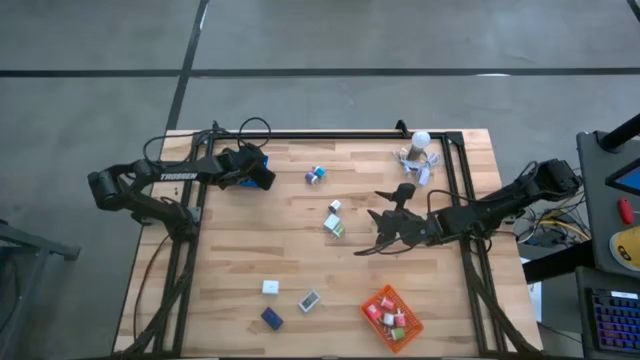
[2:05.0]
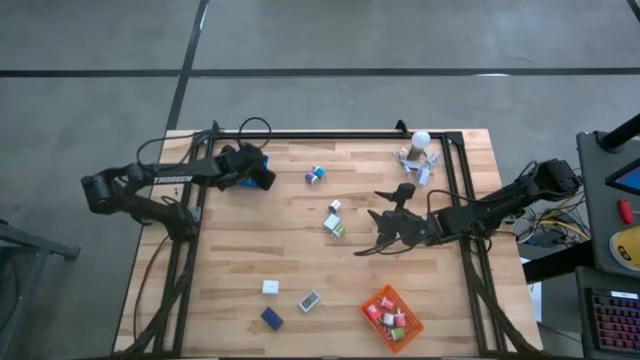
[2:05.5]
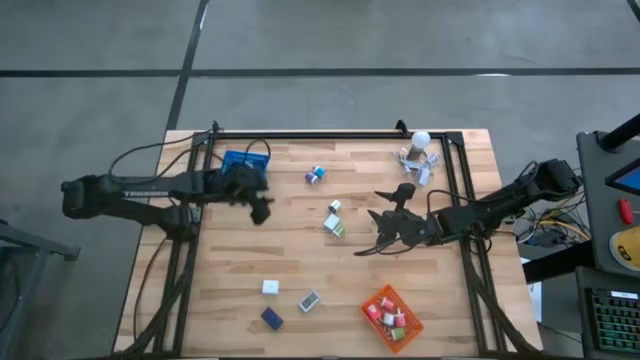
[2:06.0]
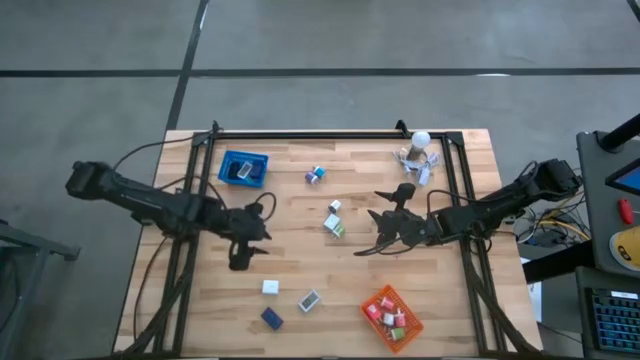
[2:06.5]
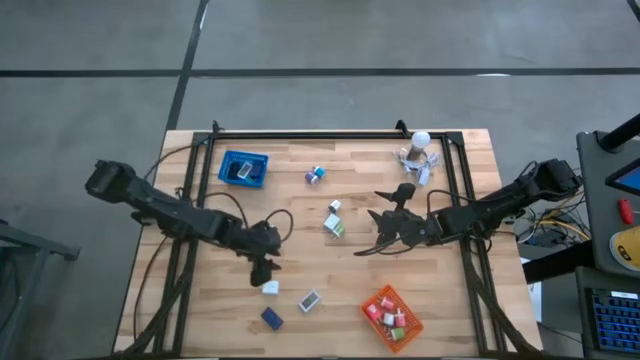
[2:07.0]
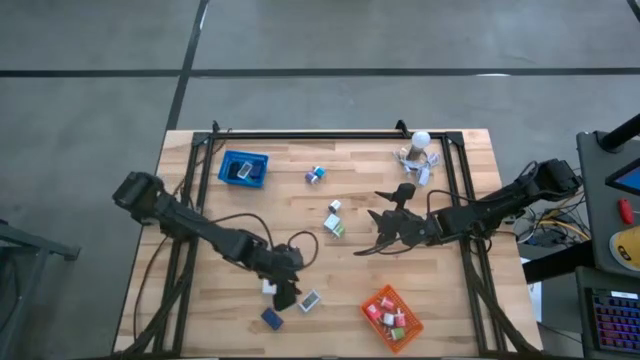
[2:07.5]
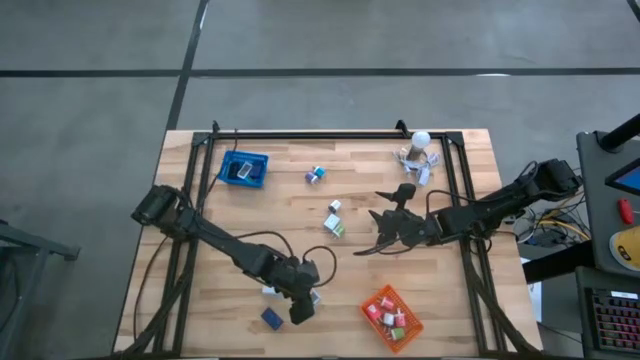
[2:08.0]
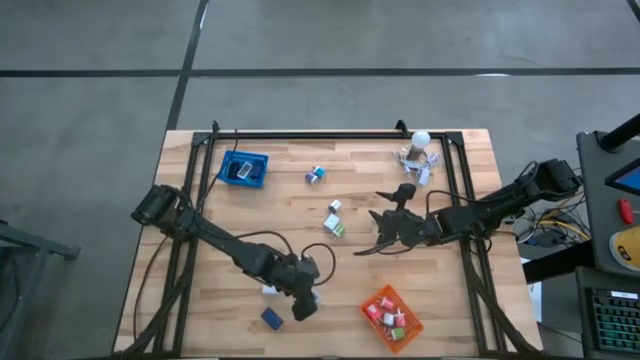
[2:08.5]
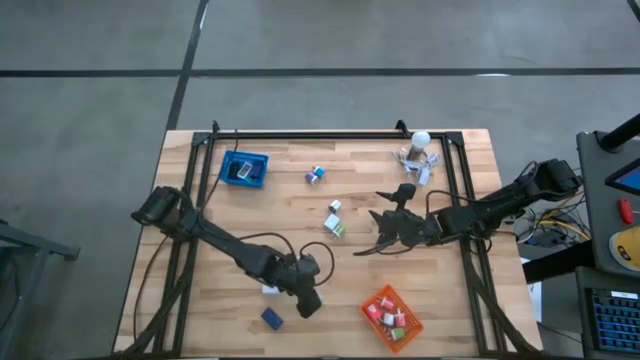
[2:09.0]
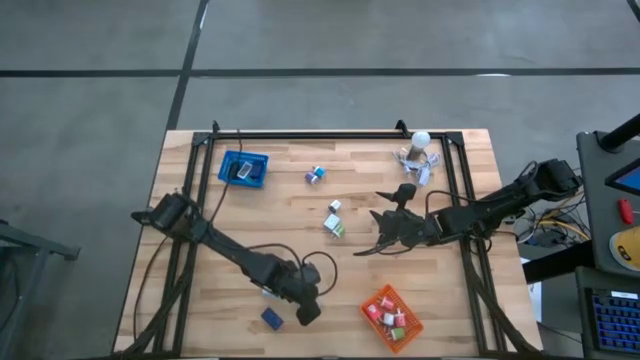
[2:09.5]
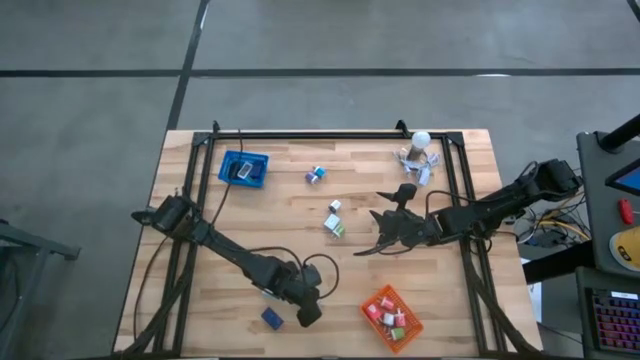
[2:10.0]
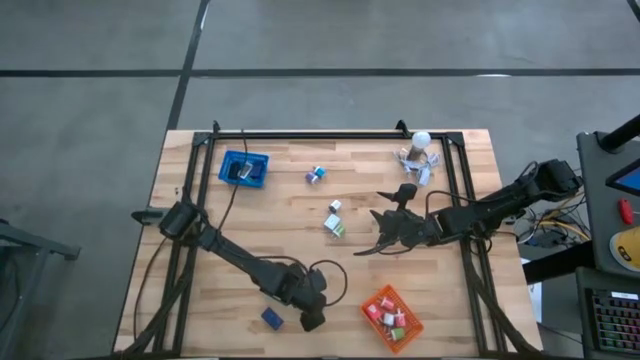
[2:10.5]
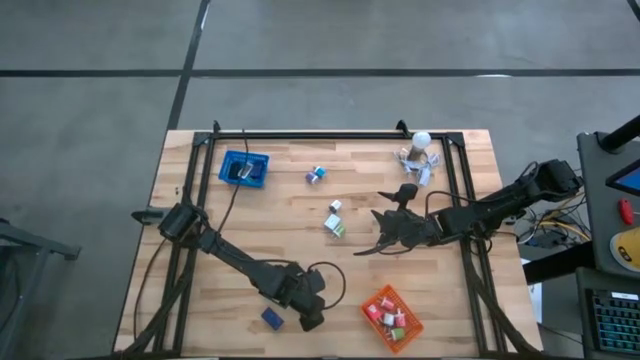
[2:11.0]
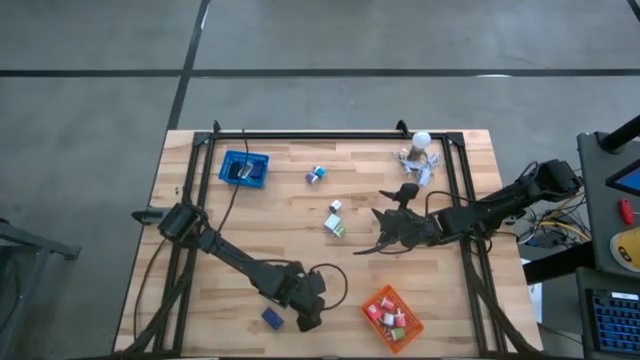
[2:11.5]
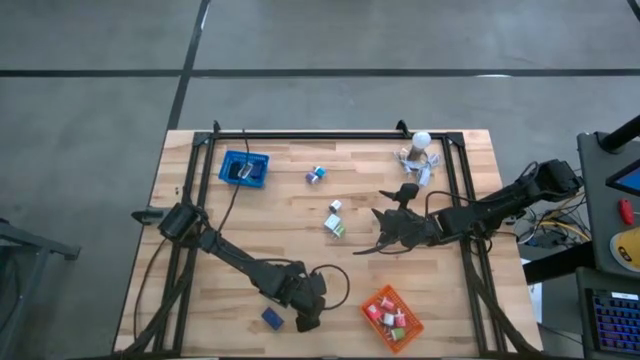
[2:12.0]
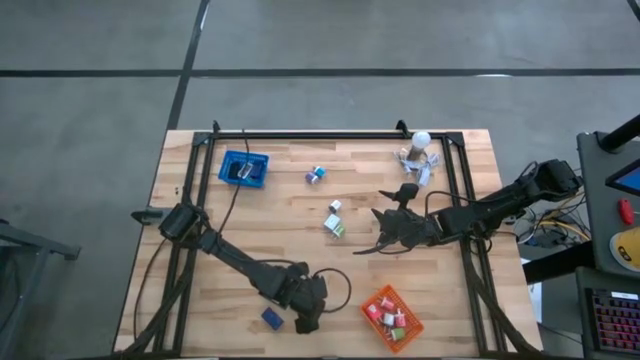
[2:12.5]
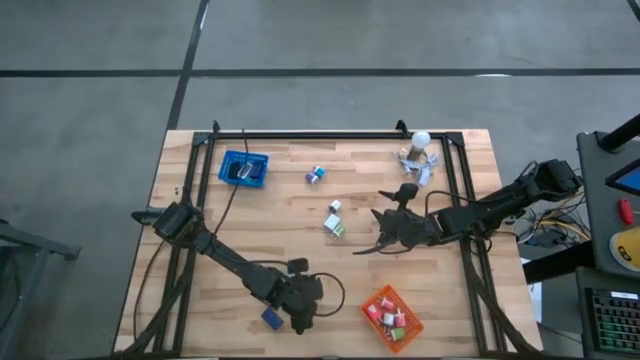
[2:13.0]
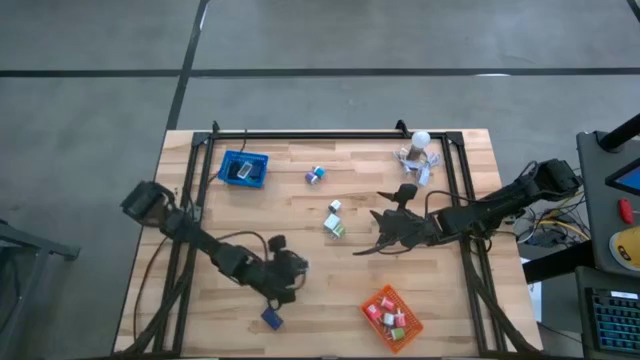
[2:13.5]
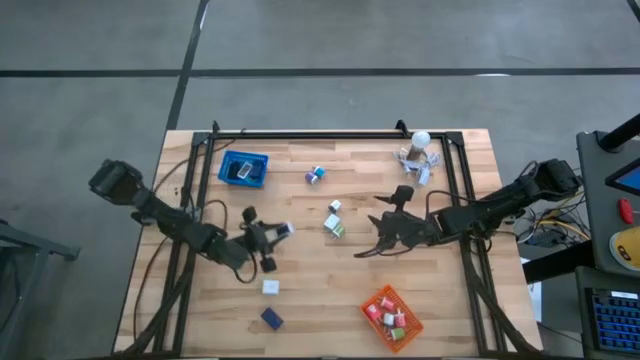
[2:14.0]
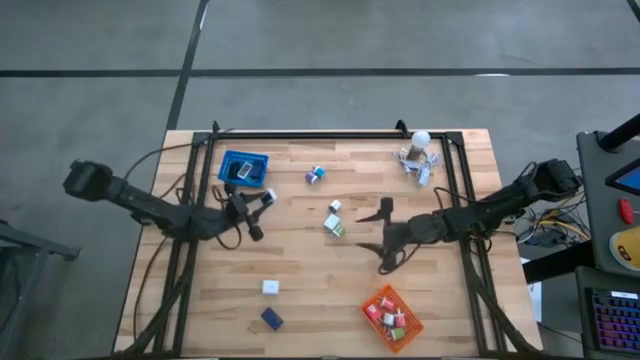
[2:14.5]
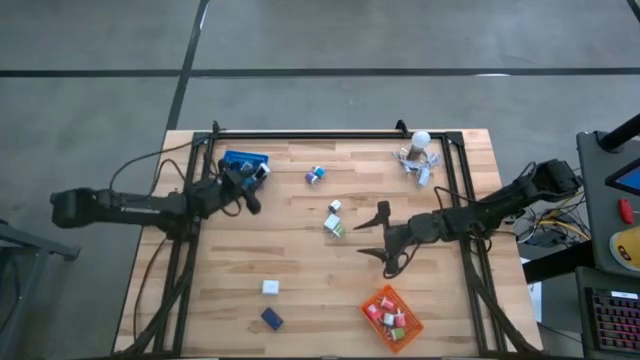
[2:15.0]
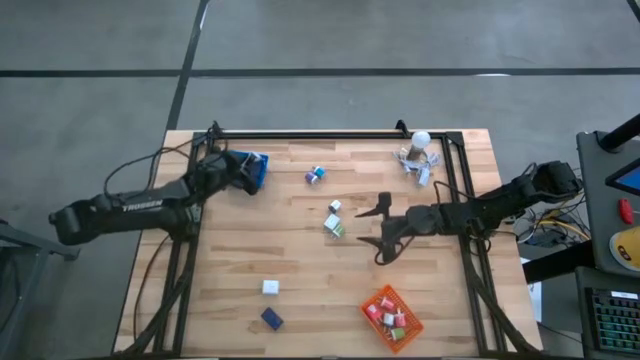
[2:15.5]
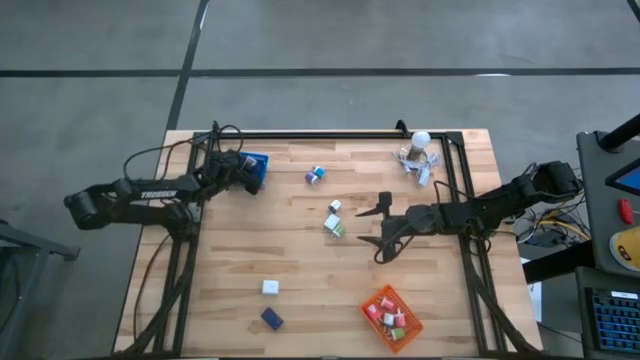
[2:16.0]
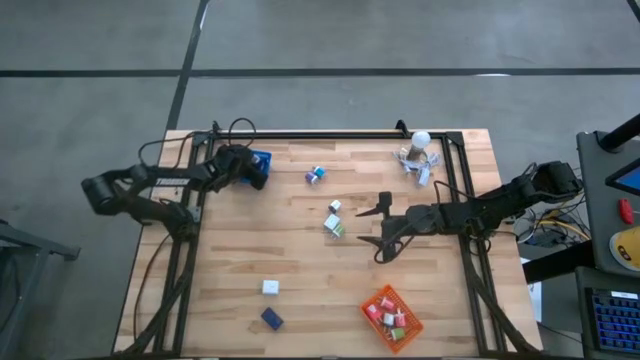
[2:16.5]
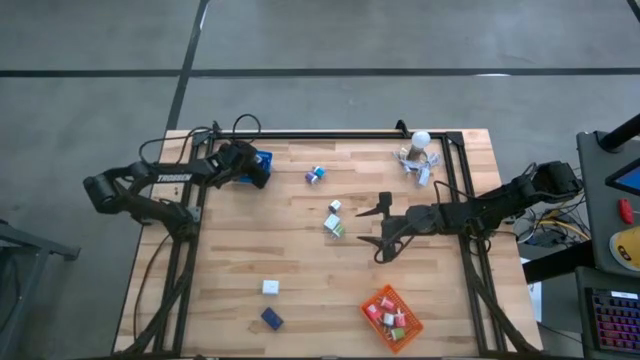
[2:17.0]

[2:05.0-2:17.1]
Task: Pick & Place Office items
Put the white digital clock into the blue bin

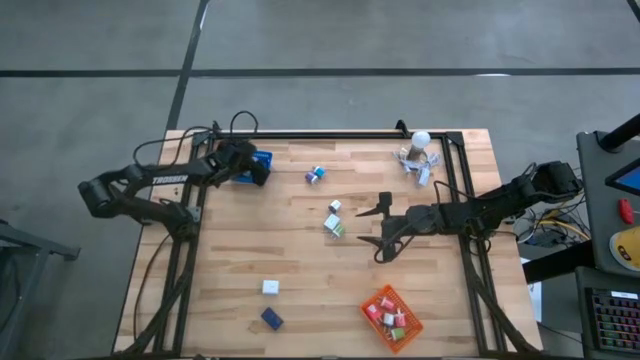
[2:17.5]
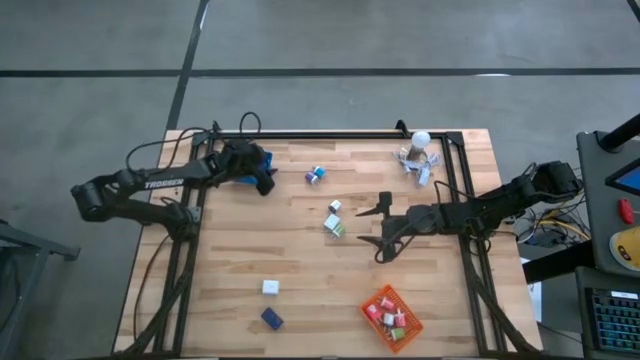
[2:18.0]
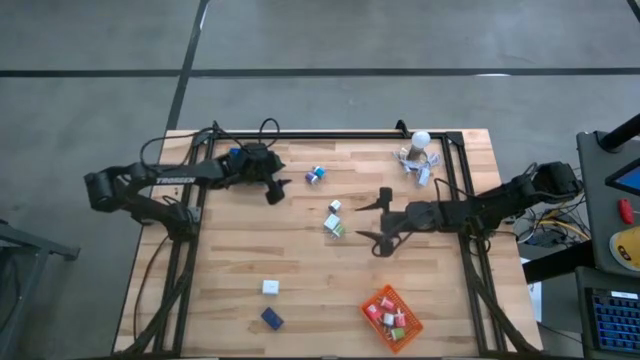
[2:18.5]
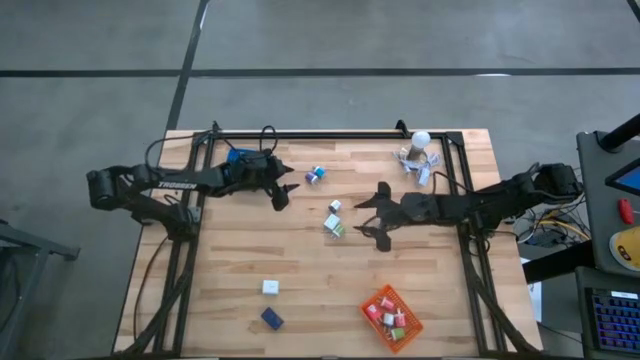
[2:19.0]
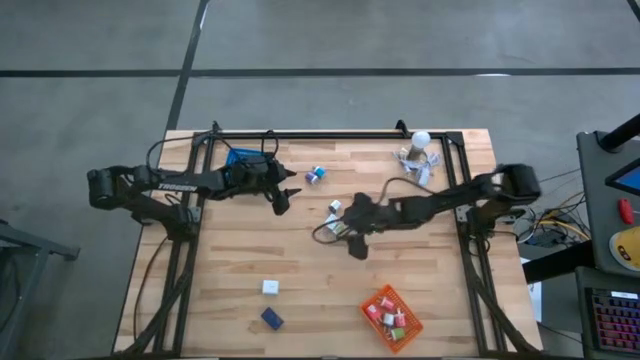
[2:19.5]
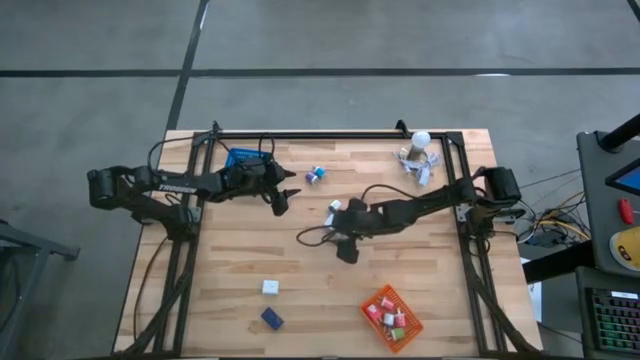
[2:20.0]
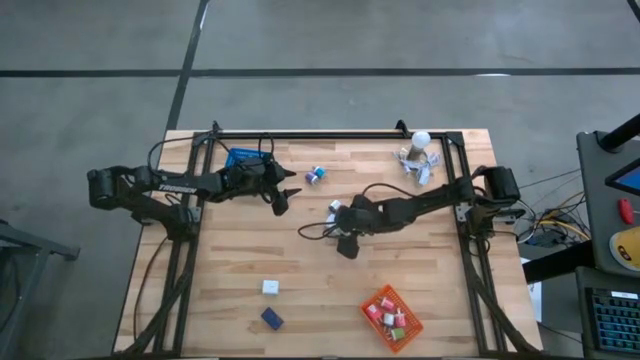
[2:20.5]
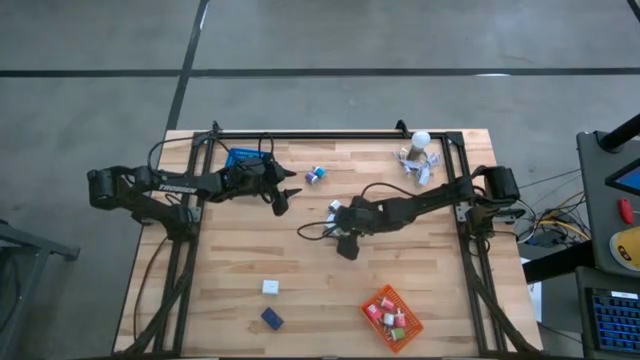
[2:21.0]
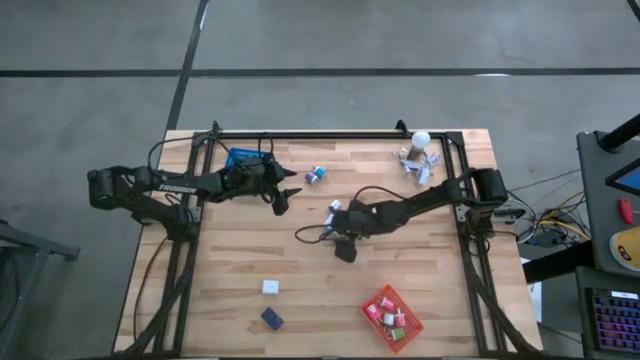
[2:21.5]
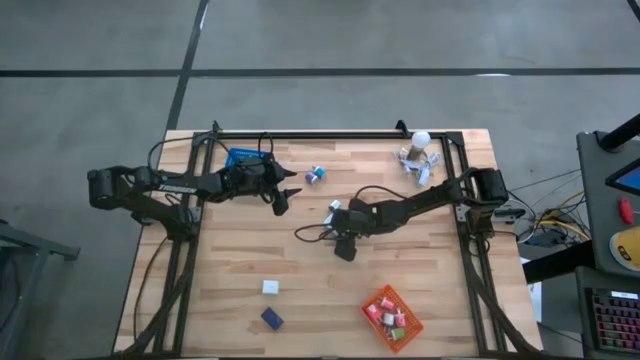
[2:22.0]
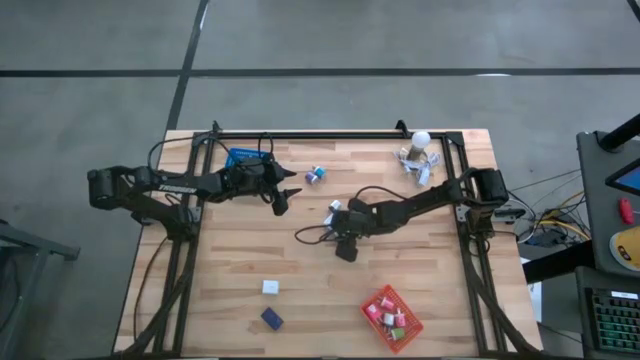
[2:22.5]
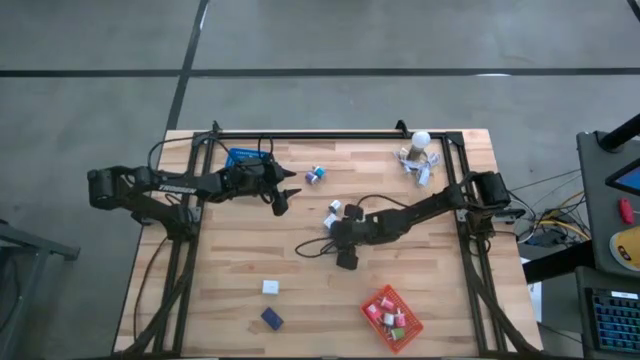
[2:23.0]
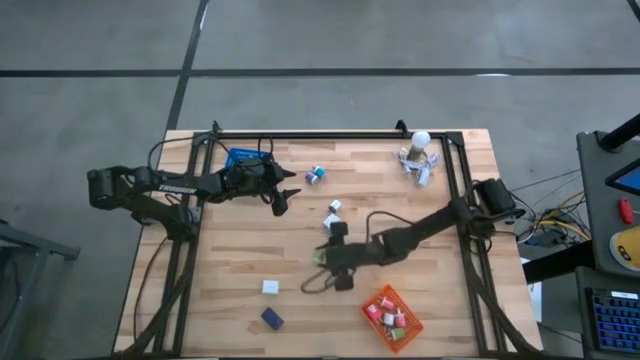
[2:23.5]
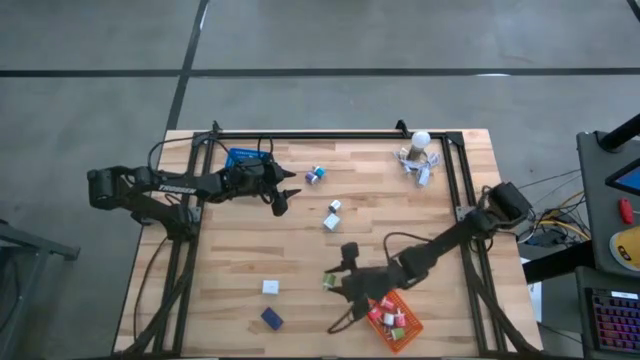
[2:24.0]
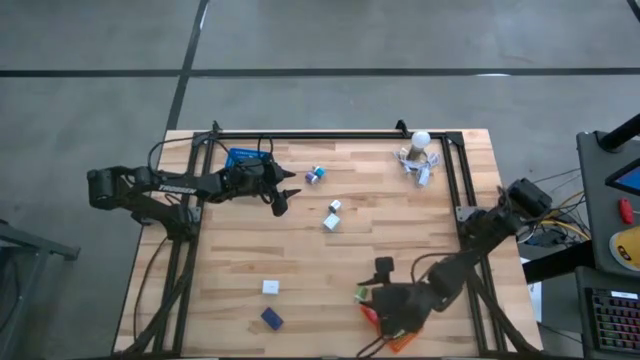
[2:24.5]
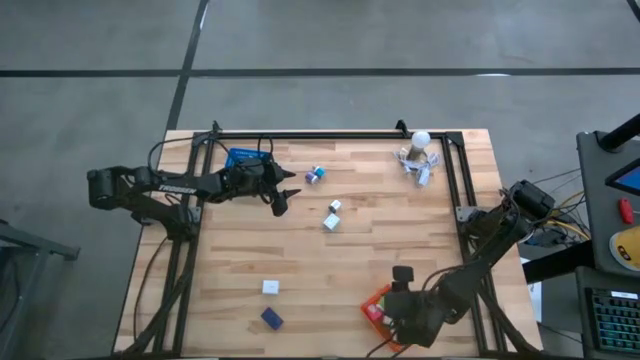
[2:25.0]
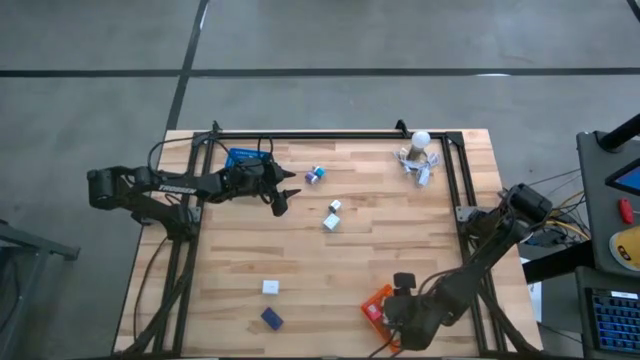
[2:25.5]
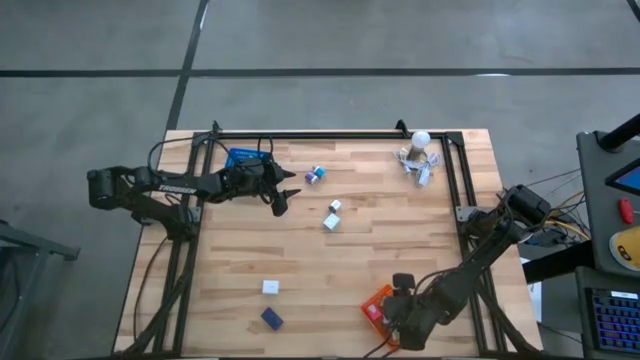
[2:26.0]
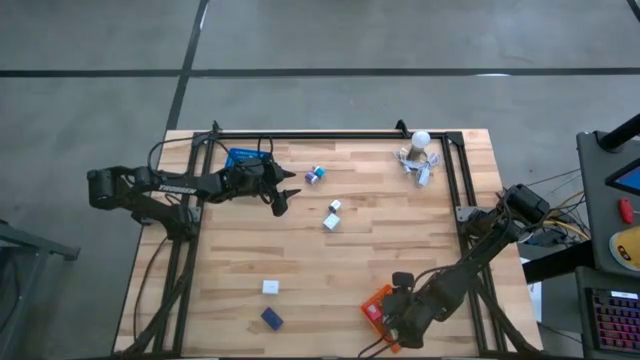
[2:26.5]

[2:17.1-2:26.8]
Put the green charger adapter into the orange bin
